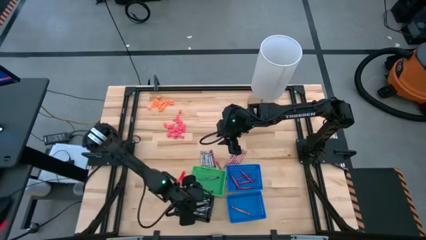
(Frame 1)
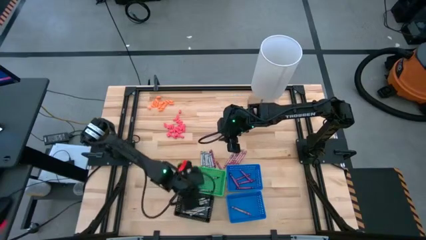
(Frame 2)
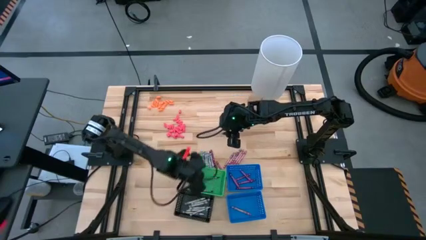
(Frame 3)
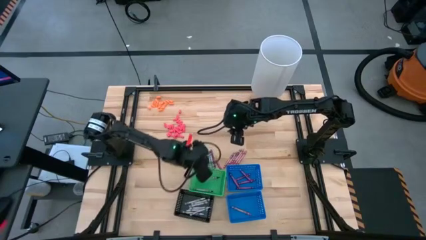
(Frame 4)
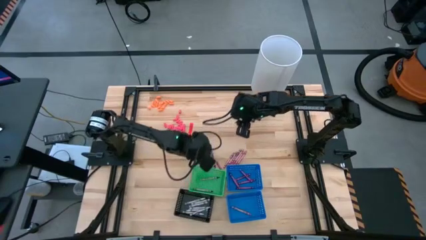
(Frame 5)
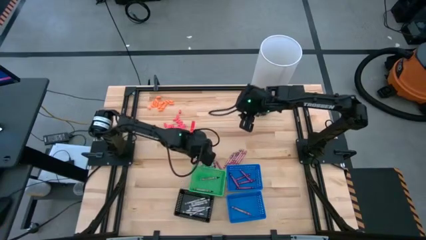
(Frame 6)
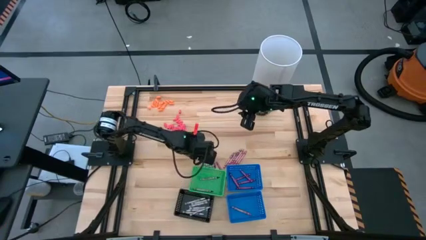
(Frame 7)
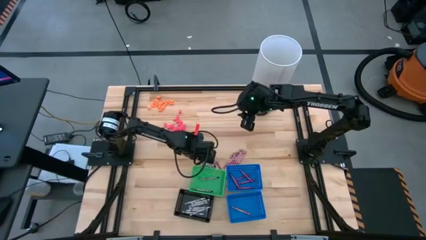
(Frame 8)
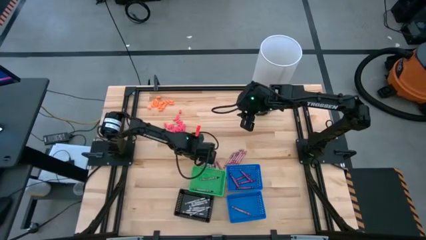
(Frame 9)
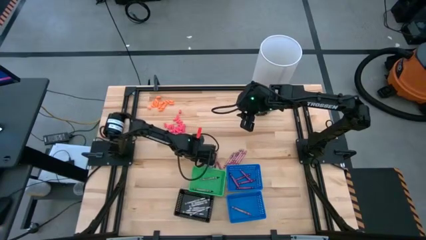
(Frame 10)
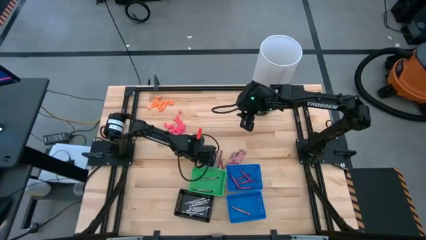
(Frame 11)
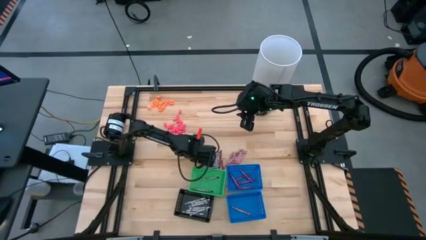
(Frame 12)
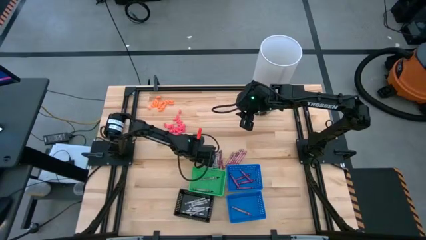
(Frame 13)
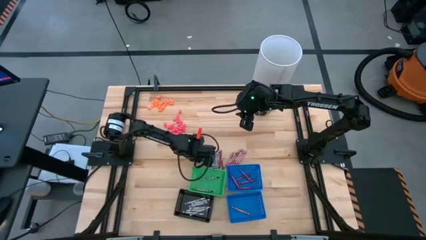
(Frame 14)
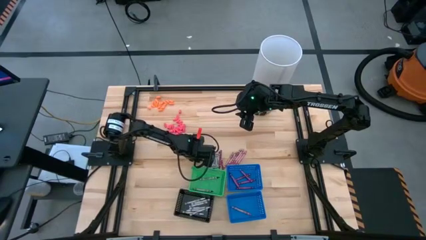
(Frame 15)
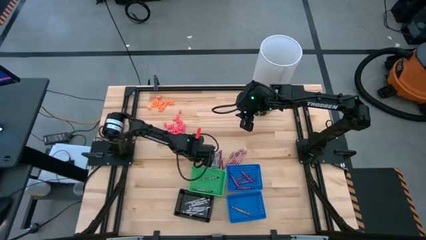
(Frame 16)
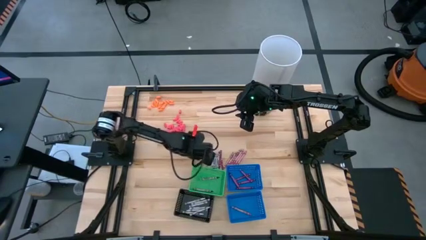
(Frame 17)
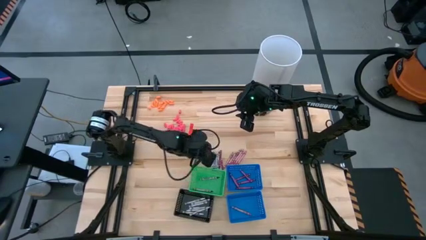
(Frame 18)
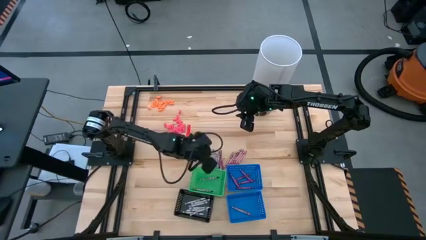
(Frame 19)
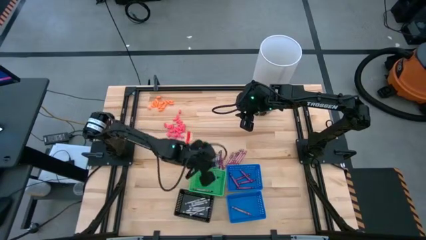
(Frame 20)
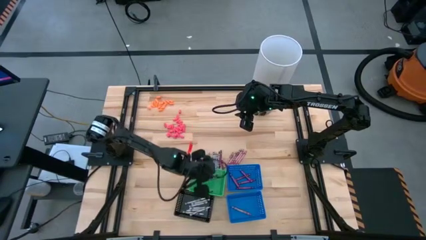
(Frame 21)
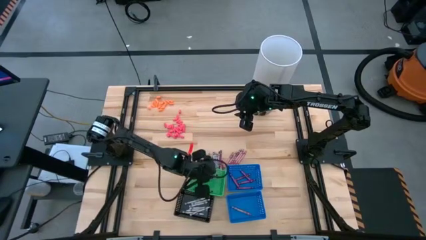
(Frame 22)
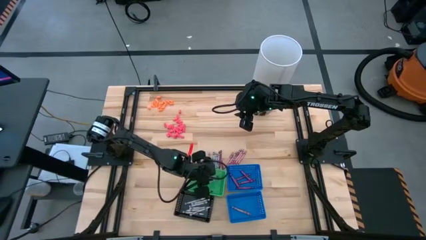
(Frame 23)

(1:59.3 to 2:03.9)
Task: Sort crayons
Put the black crayon into the green bin

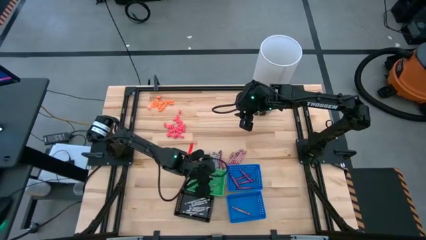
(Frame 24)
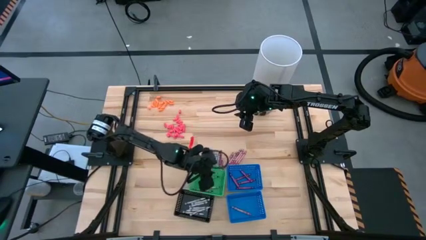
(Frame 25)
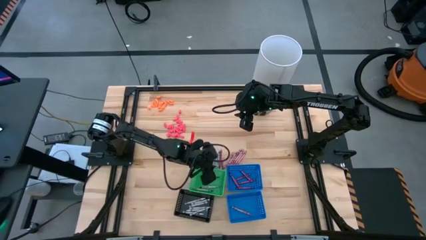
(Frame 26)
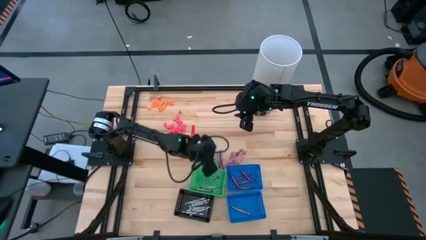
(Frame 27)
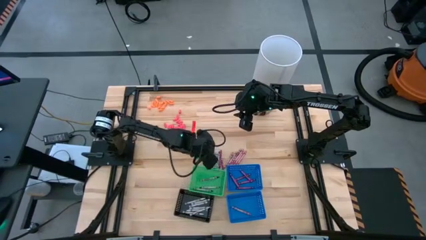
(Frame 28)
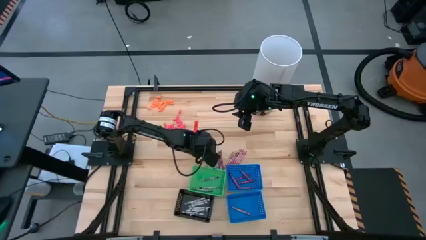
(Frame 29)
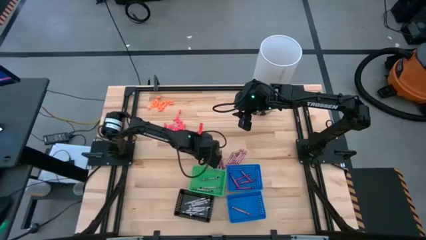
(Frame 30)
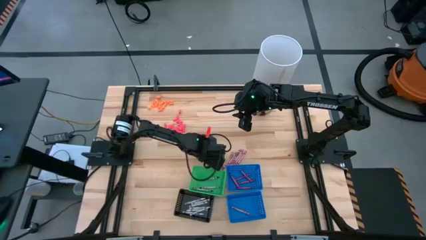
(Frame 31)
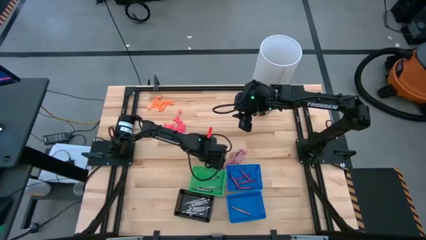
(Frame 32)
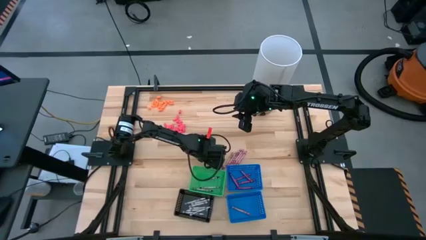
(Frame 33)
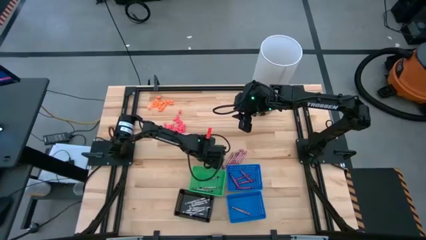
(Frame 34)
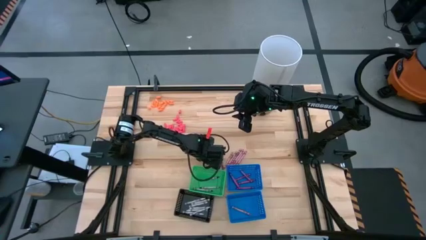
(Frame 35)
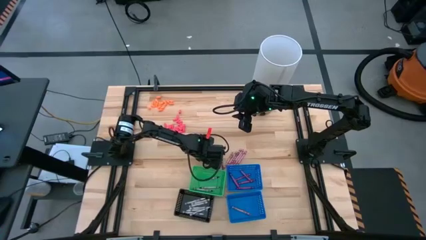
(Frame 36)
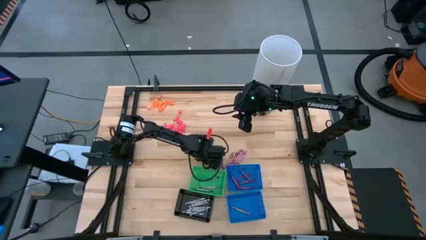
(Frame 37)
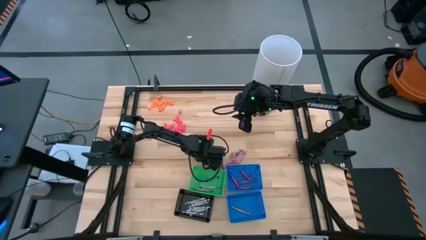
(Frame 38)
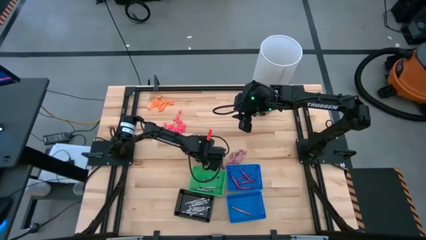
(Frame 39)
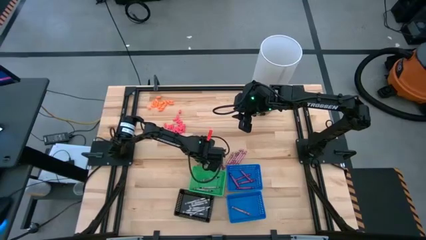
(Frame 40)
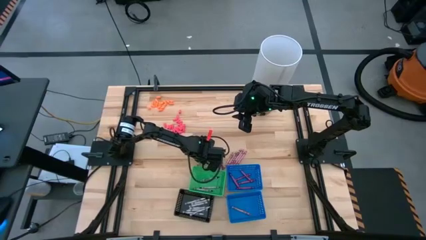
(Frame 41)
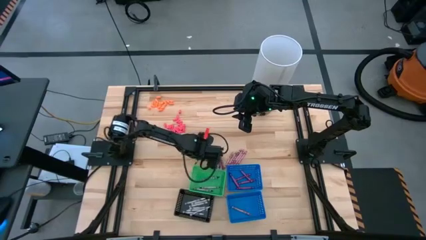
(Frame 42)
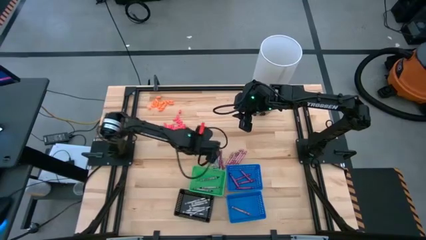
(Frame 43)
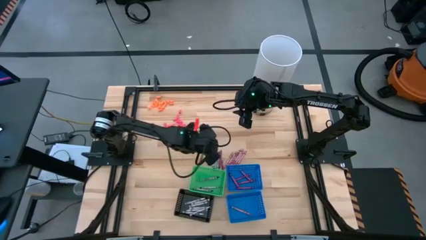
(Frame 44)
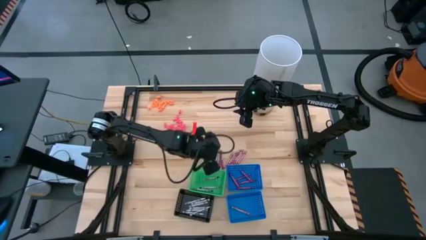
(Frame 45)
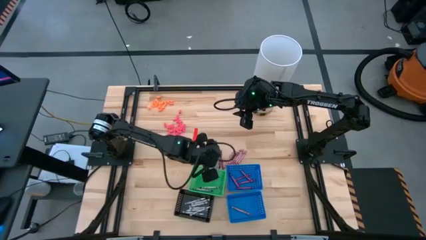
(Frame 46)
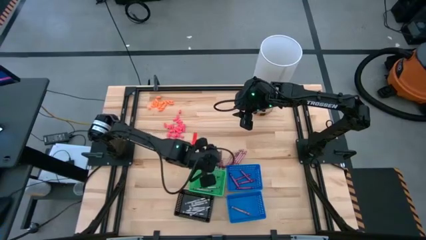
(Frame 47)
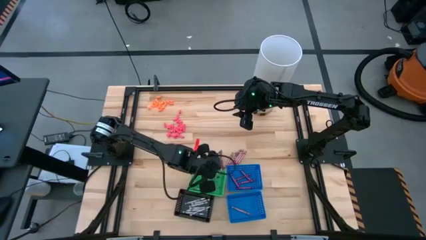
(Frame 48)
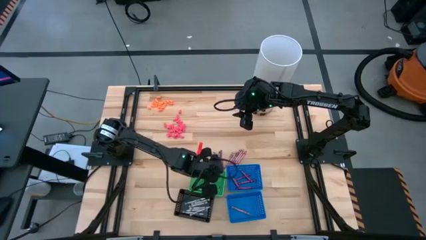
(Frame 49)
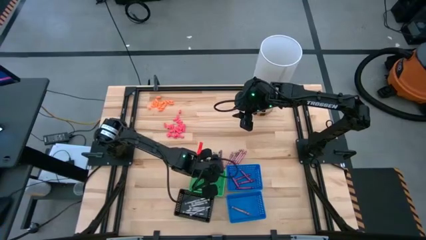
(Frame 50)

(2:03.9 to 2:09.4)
Put the black crayon into the green bin

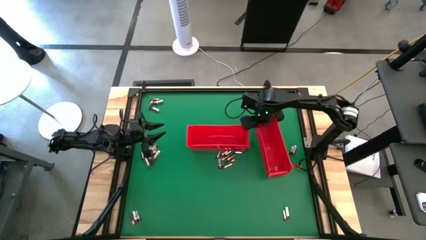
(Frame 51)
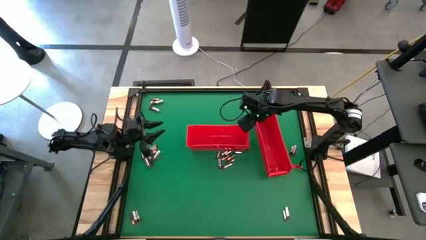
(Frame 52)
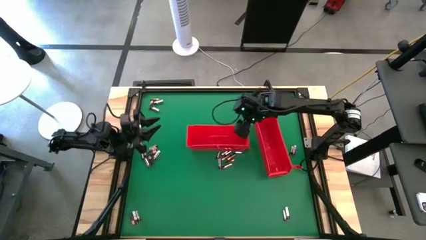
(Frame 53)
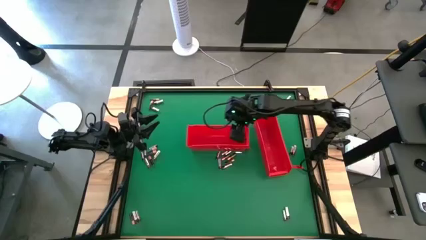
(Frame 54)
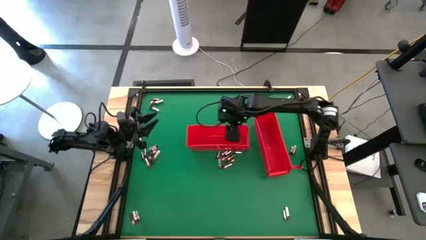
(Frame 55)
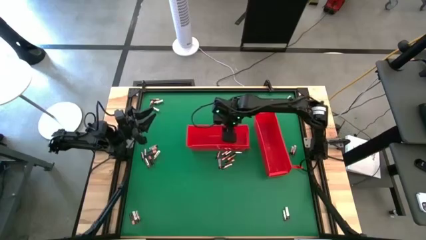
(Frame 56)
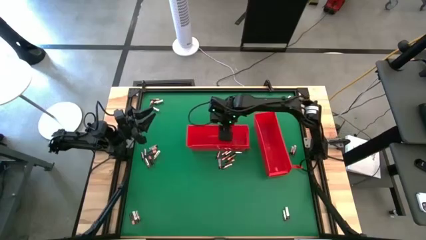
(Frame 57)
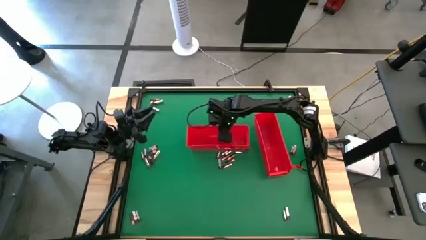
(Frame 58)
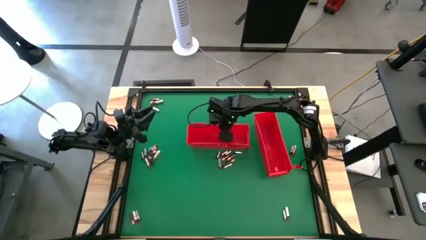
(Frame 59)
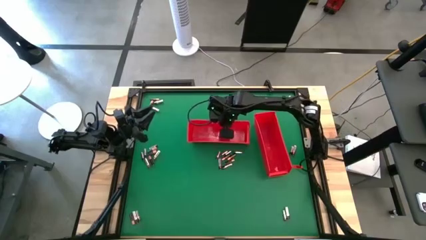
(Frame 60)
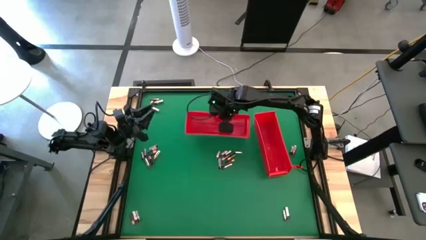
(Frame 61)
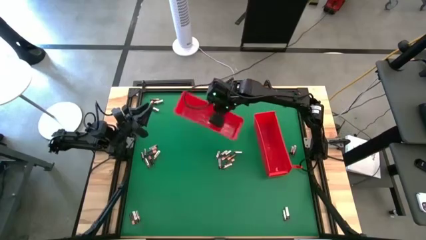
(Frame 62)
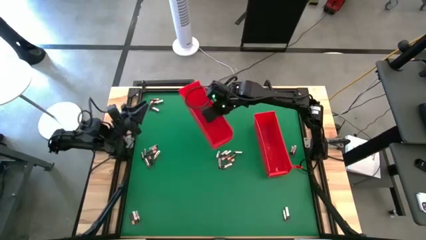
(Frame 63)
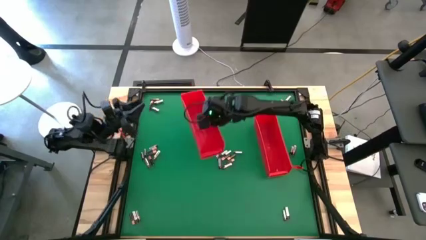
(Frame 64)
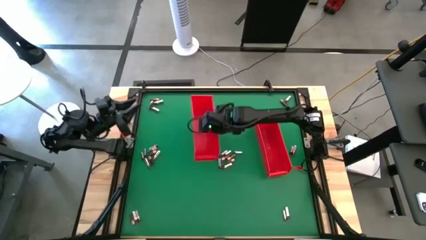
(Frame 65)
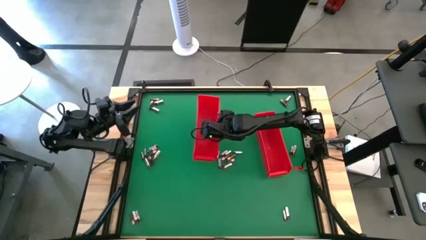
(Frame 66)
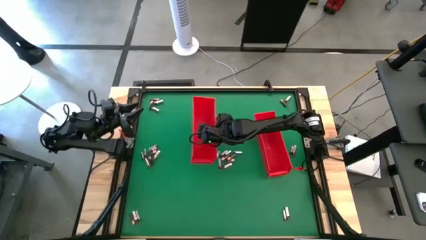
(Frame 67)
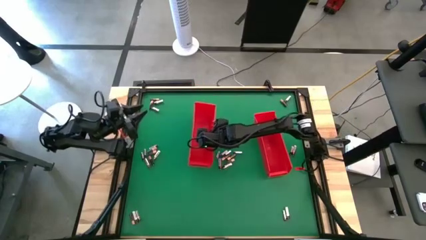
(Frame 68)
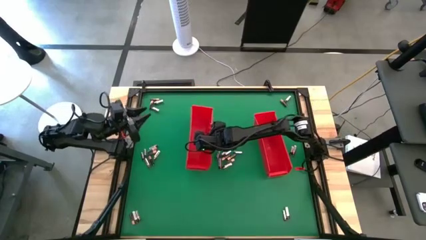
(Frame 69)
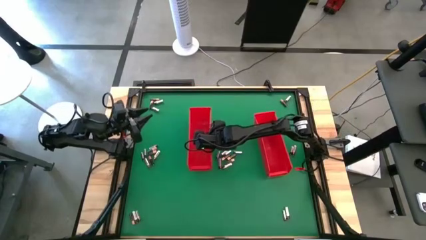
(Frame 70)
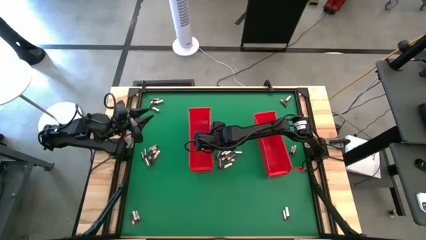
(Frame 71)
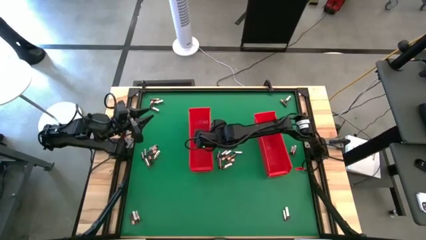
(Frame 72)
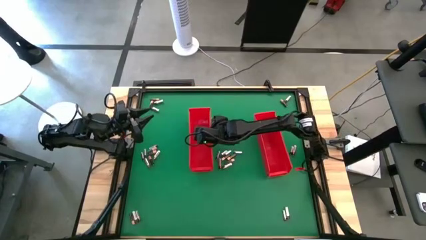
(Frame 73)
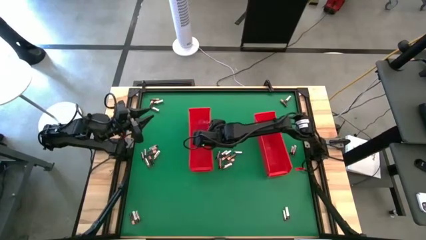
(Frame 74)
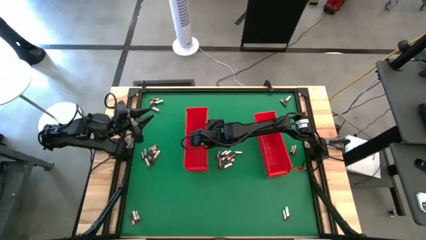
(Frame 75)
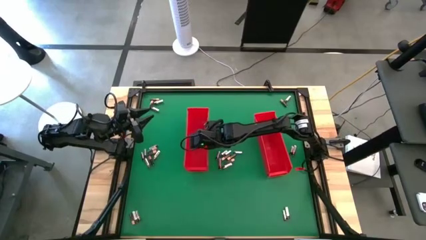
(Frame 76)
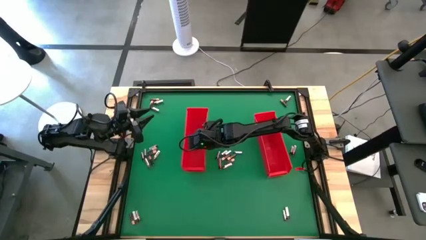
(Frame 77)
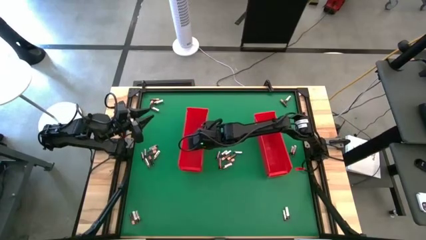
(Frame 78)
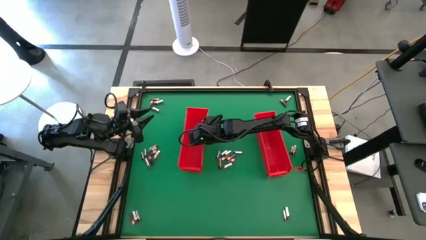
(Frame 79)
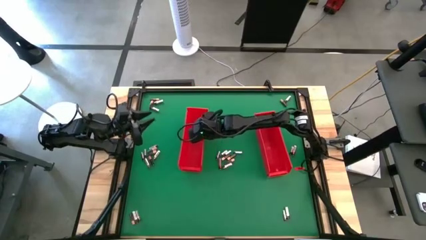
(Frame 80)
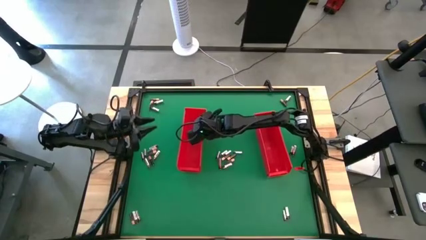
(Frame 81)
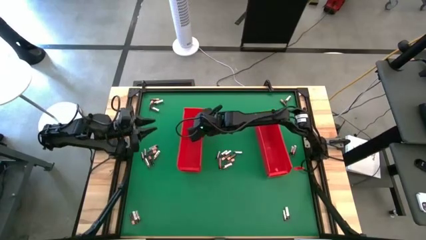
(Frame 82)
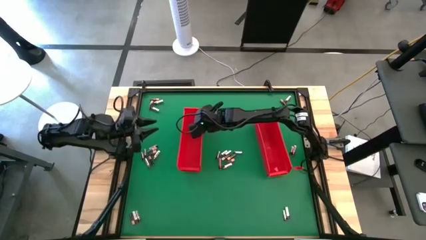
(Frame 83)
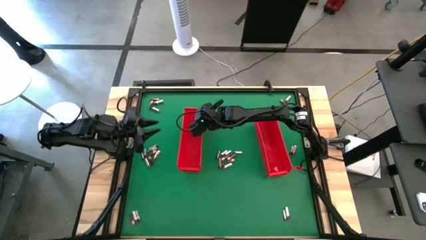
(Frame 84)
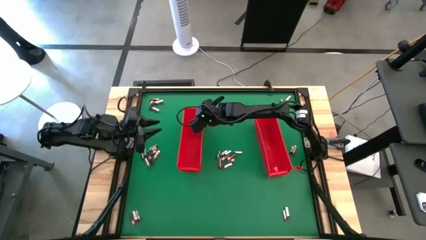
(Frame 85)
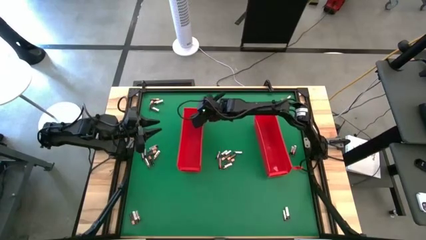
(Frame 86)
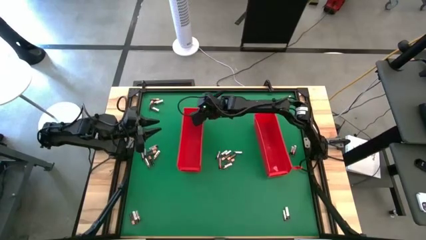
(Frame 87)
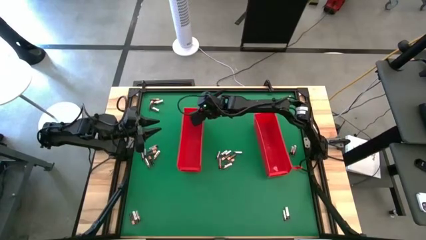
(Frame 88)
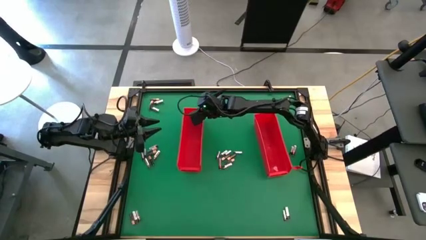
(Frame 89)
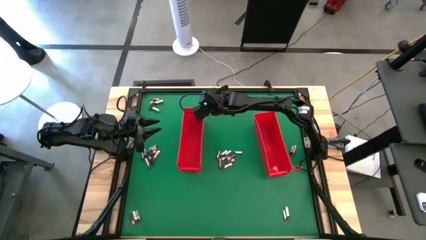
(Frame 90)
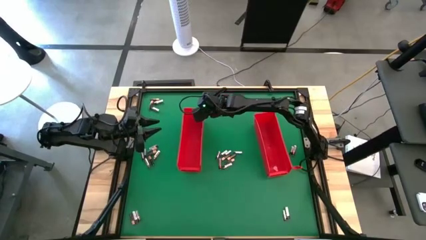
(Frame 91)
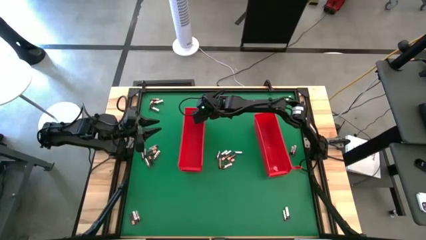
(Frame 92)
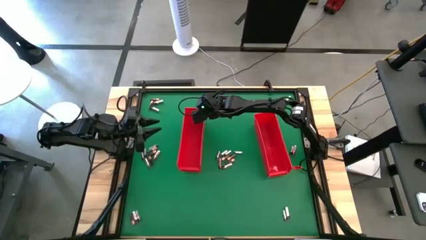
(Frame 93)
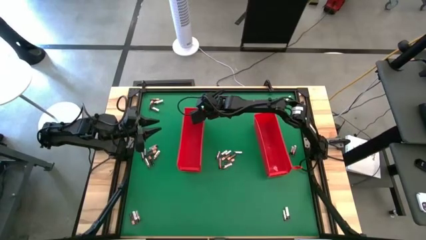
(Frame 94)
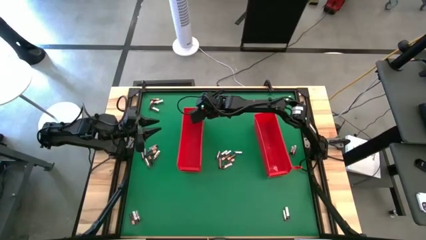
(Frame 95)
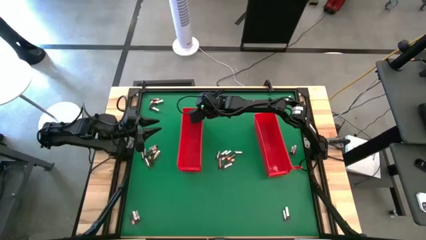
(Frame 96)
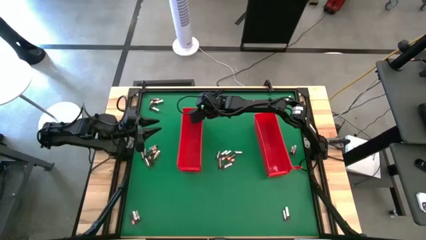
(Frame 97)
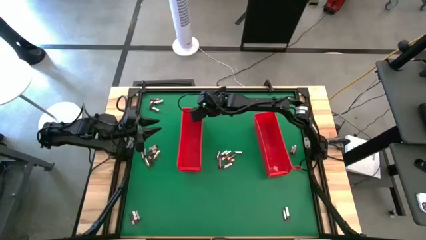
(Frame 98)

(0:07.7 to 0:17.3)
Task: Sort batteries
Adjust the left red bin
